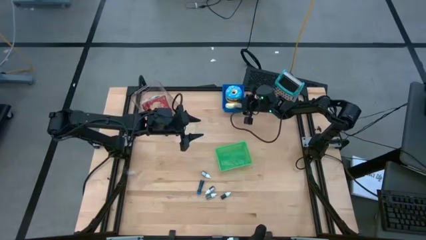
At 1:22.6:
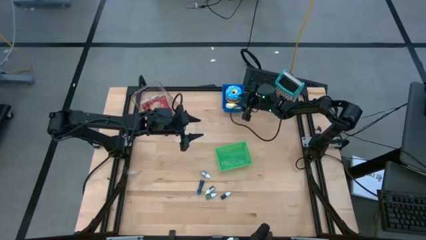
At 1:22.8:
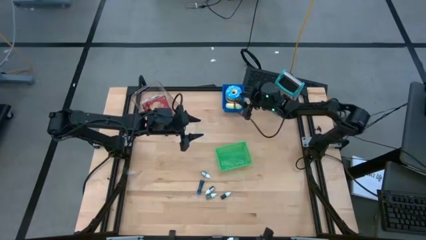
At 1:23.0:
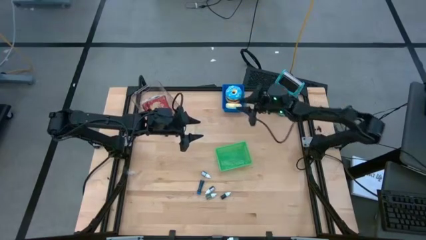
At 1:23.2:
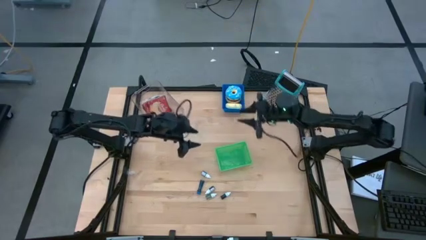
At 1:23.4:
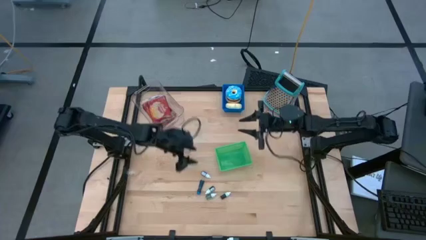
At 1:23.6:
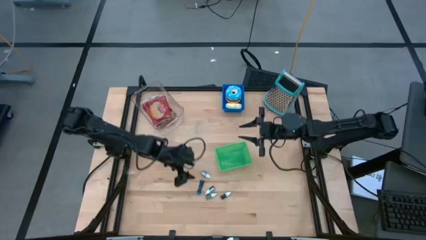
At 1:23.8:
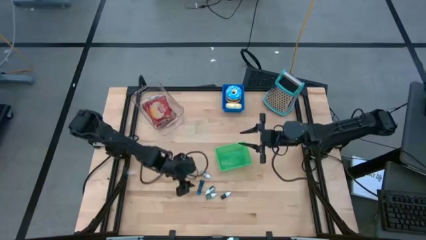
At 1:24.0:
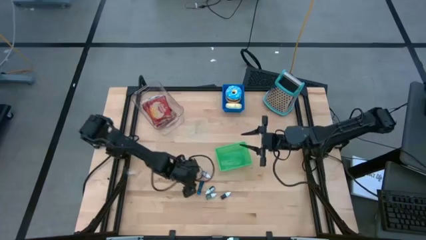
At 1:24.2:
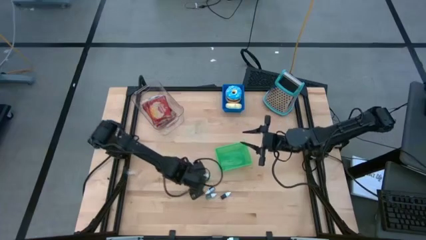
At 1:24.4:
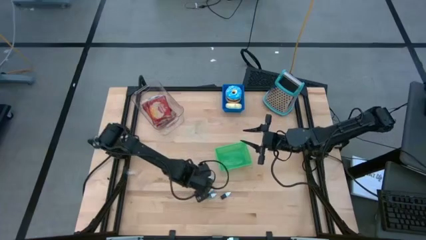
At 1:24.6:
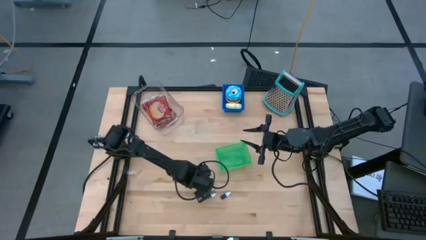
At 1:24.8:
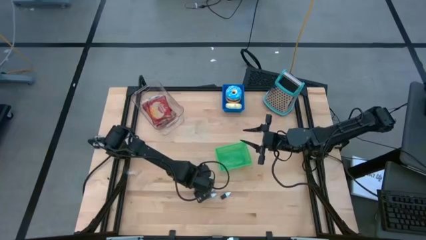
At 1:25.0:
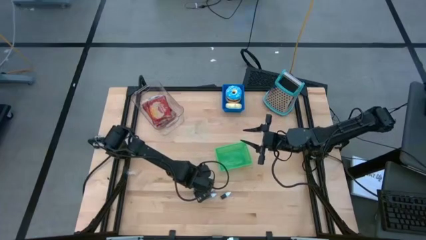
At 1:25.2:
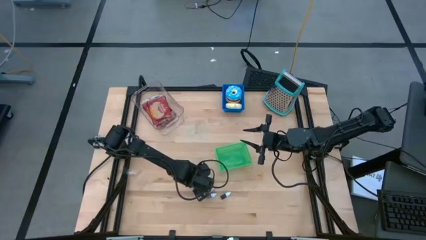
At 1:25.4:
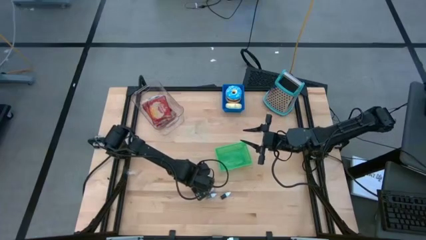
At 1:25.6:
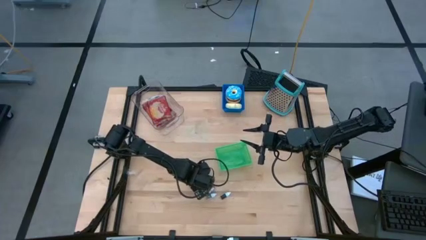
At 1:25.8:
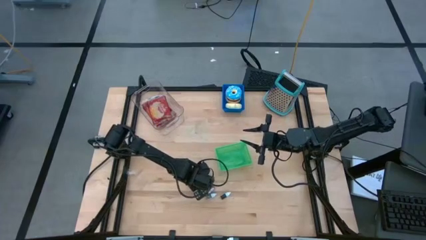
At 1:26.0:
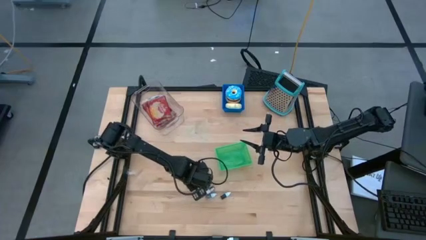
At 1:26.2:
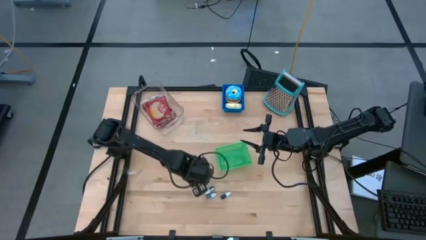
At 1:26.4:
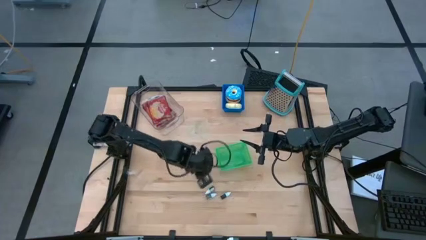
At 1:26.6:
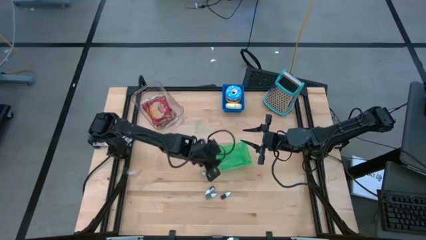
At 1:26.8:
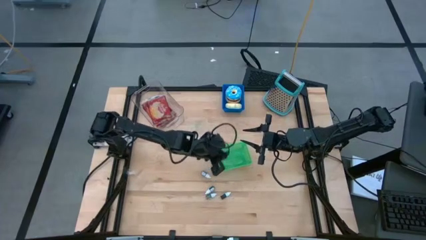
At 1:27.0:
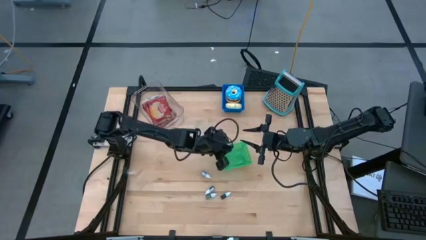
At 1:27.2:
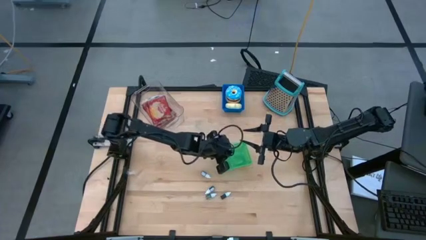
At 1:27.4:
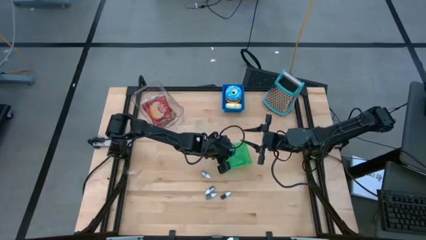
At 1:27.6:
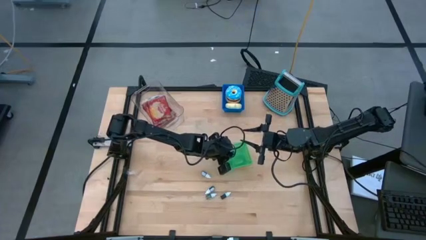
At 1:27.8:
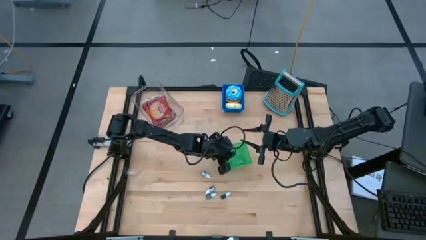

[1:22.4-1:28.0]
Put the blue food coloring bottle into the green bin

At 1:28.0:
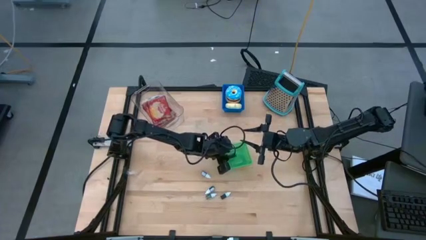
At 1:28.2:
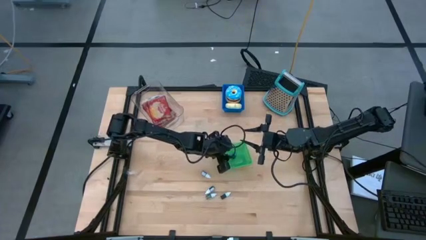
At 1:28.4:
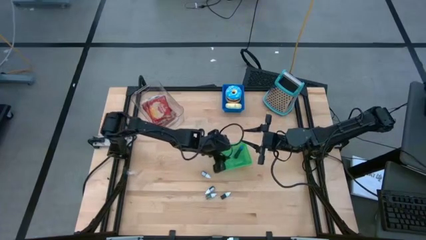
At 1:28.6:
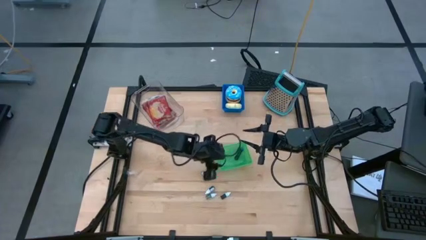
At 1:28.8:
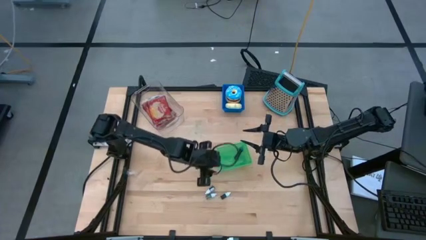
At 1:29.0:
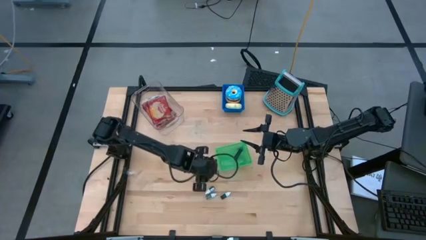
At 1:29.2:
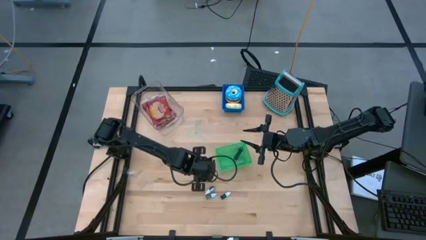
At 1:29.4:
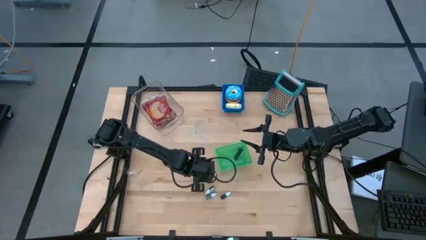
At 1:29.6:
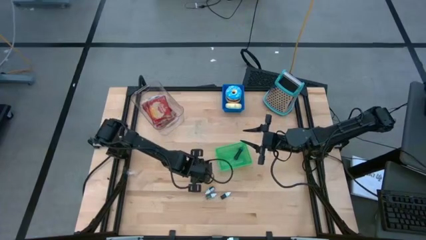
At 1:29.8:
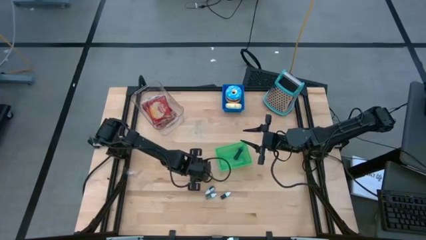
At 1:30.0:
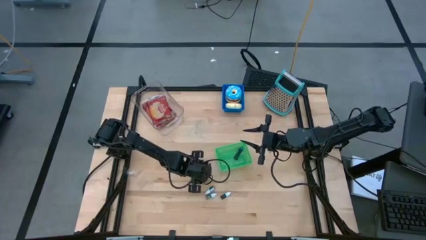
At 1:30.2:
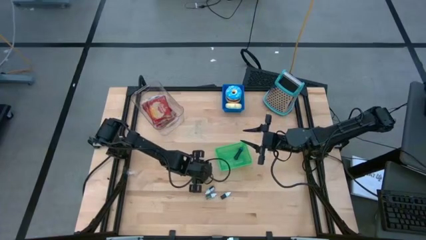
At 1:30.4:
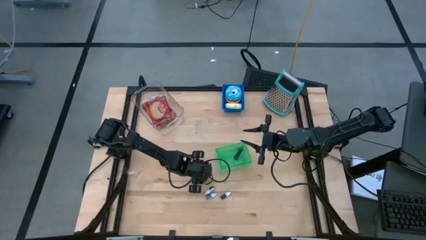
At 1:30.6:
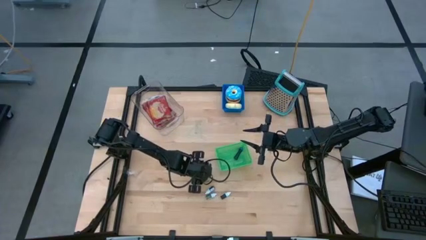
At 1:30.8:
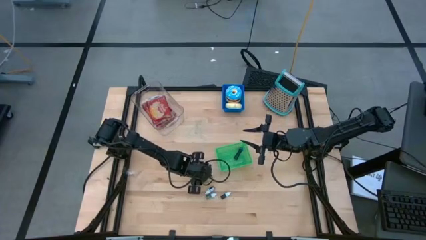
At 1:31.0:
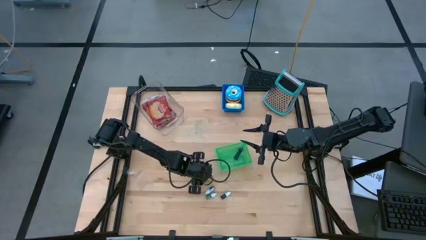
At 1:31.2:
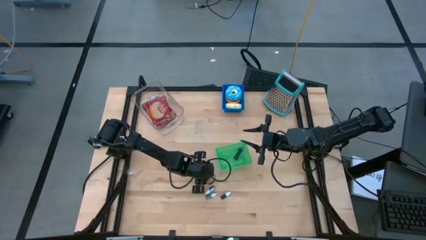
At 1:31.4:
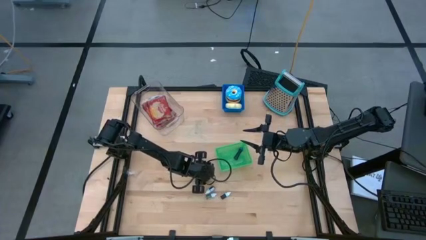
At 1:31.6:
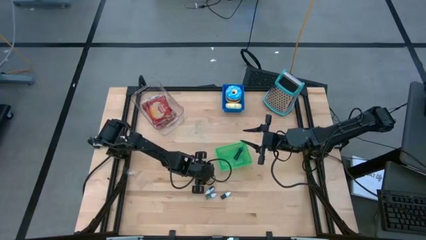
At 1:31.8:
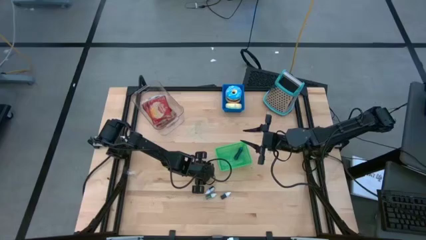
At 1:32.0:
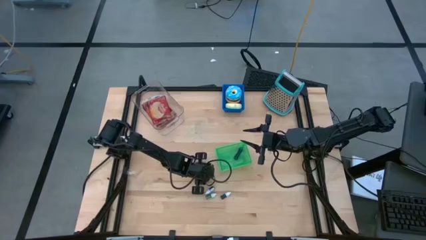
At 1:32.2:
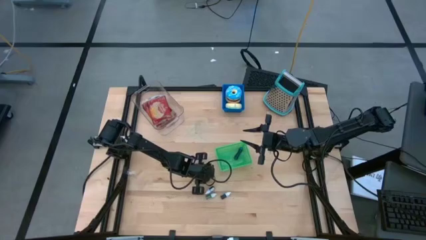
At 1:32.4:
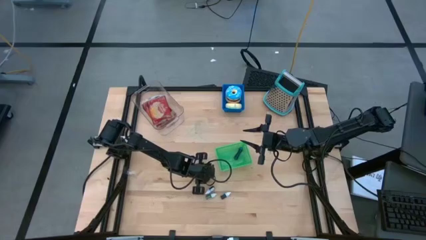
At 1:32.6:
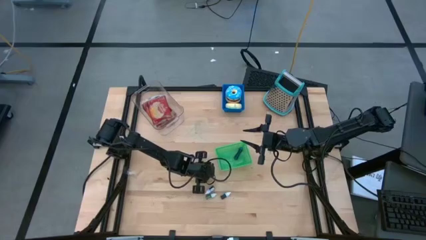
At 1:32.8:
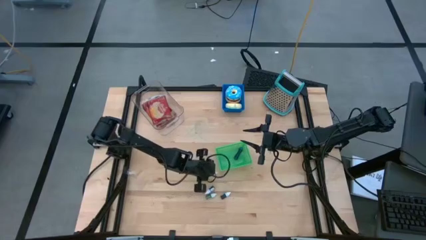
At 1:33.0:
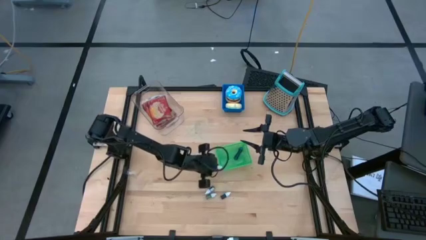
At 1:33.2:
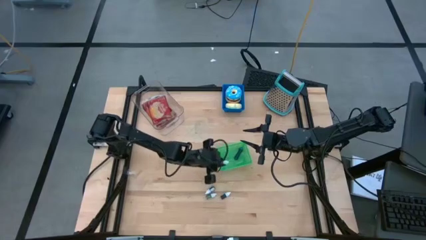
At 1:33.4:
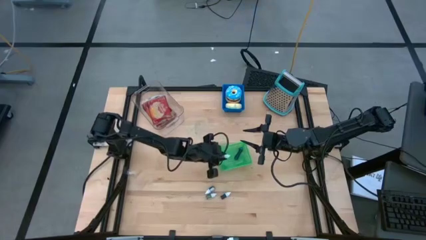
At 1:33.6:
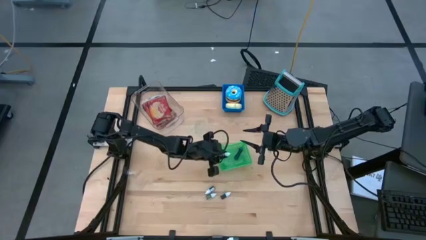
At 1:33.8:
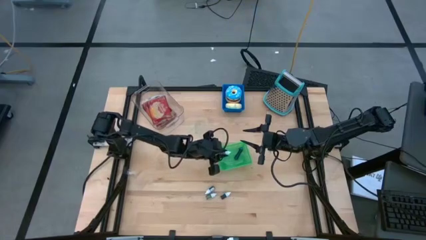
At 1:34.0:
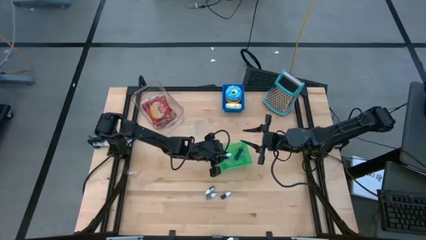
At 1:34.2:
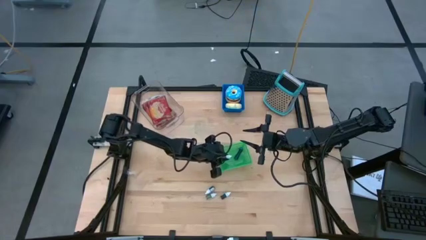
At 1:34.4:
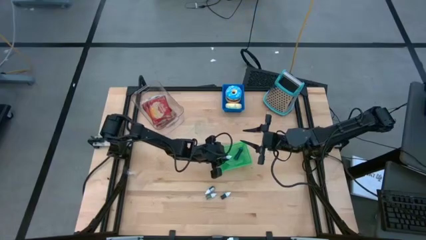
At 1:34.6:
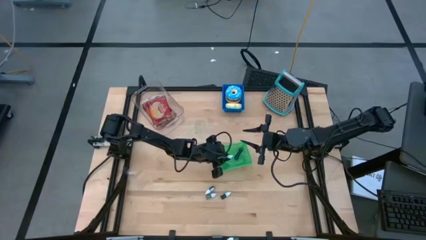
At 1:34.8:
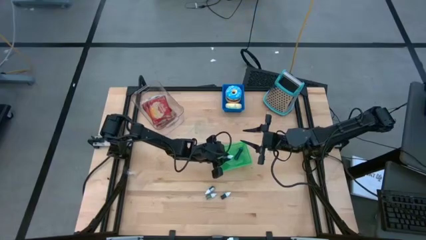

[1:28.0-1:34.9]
Put the top violet food coloring bottle into the green bin
